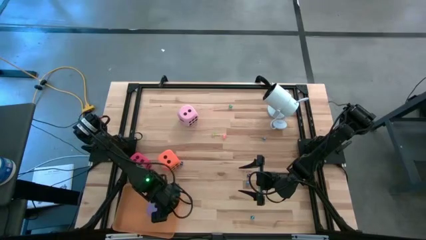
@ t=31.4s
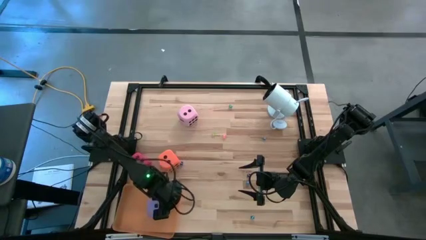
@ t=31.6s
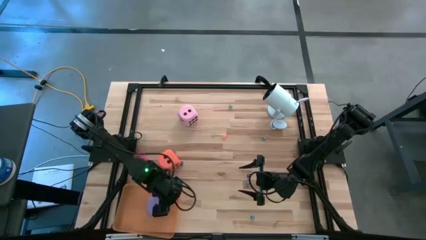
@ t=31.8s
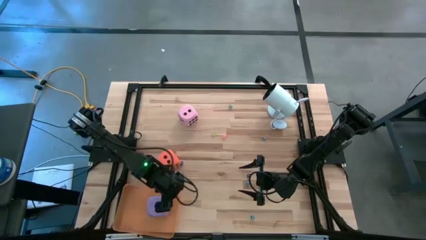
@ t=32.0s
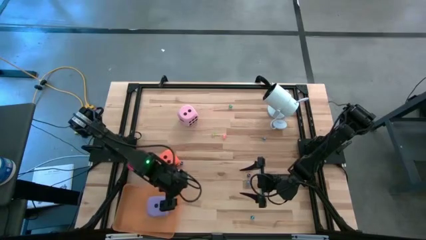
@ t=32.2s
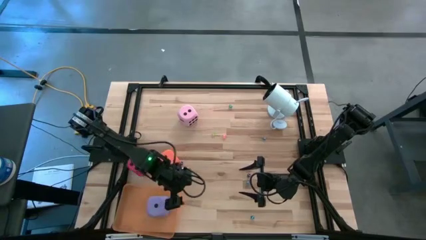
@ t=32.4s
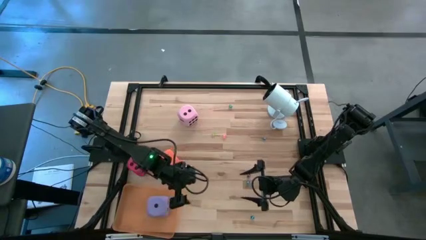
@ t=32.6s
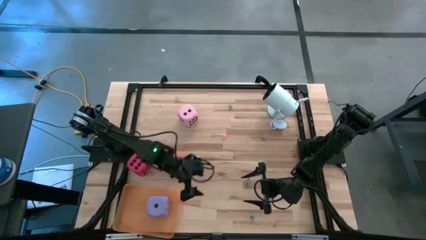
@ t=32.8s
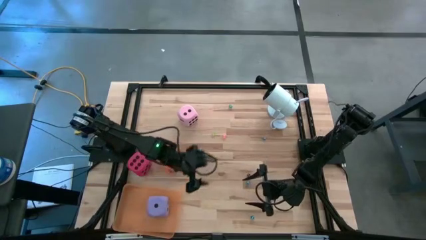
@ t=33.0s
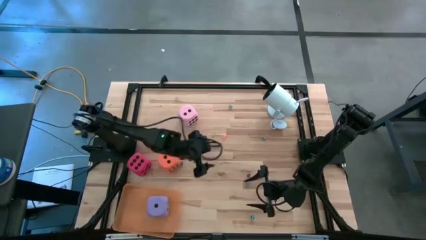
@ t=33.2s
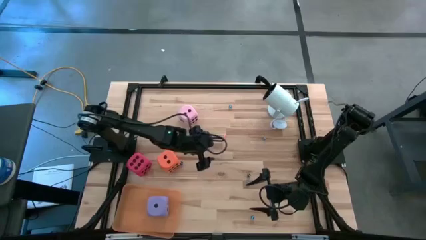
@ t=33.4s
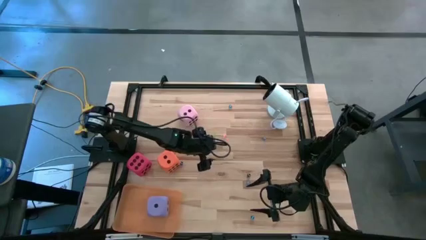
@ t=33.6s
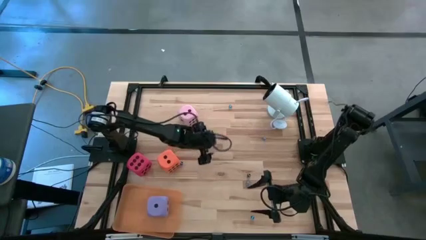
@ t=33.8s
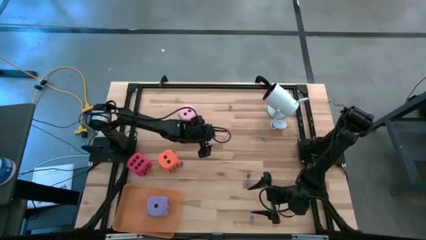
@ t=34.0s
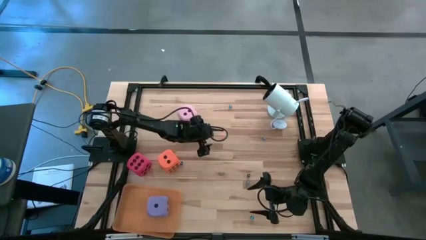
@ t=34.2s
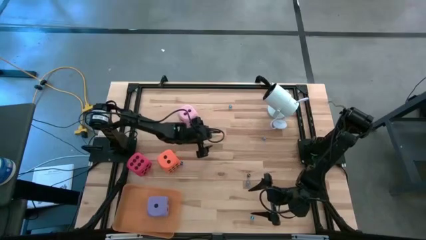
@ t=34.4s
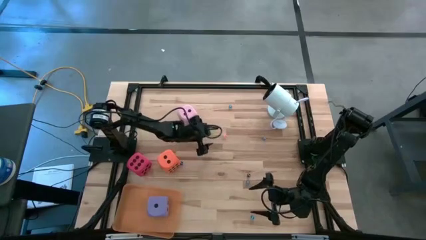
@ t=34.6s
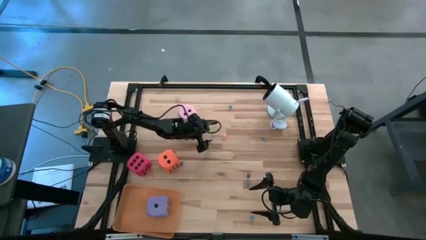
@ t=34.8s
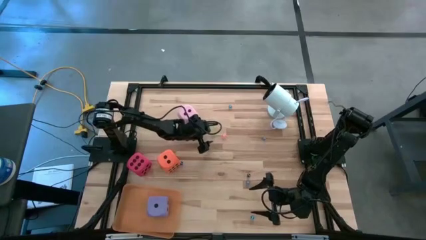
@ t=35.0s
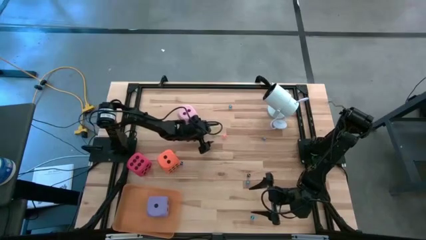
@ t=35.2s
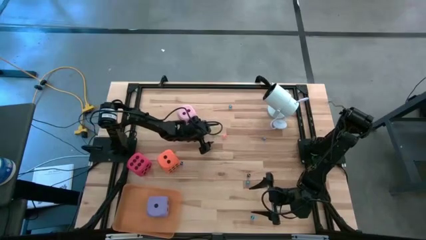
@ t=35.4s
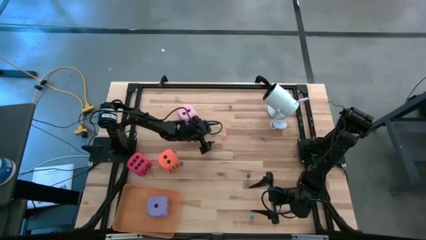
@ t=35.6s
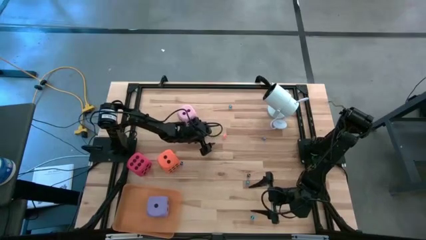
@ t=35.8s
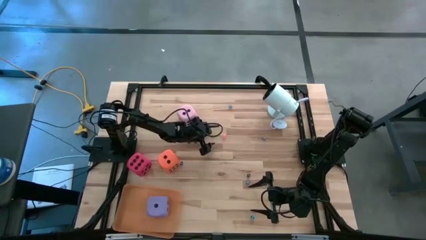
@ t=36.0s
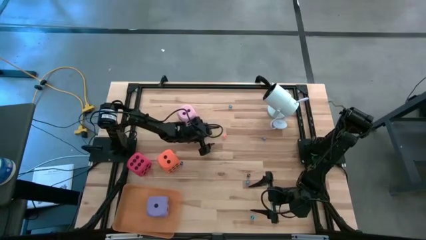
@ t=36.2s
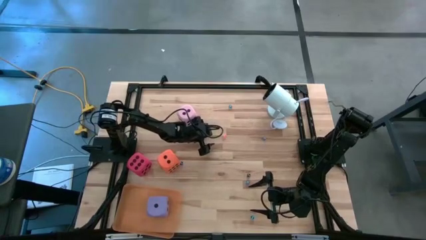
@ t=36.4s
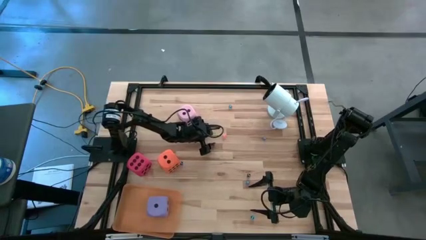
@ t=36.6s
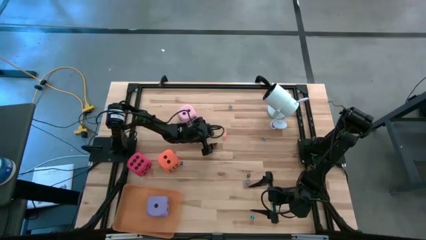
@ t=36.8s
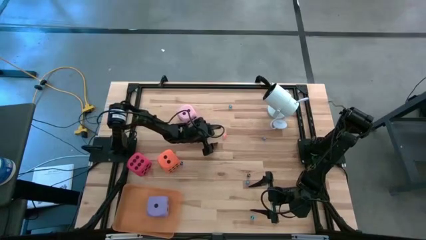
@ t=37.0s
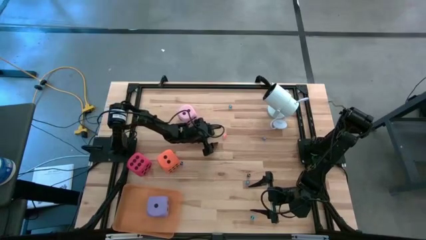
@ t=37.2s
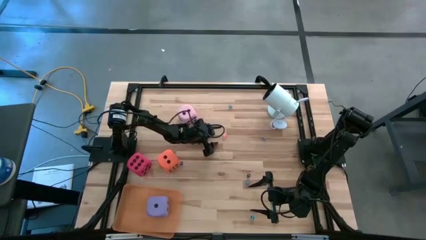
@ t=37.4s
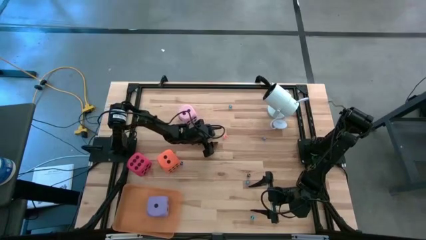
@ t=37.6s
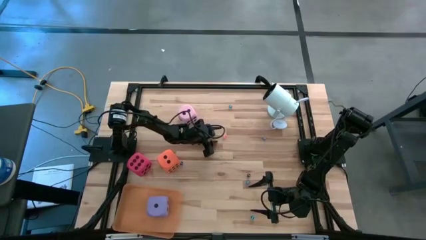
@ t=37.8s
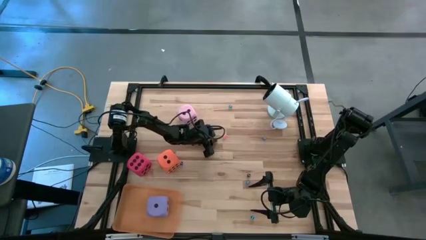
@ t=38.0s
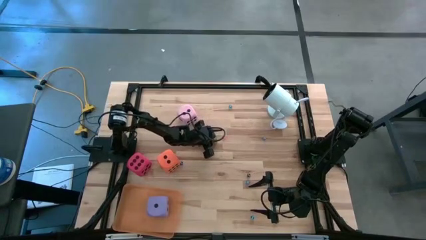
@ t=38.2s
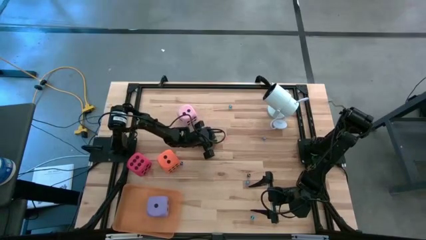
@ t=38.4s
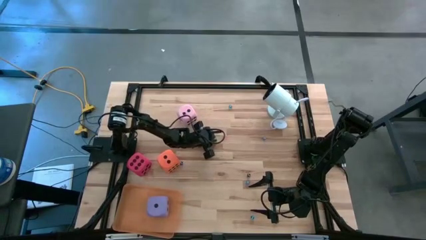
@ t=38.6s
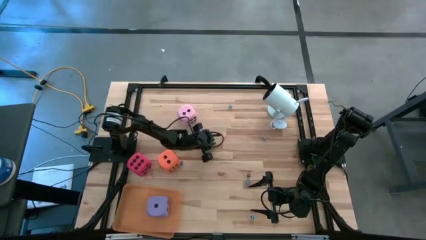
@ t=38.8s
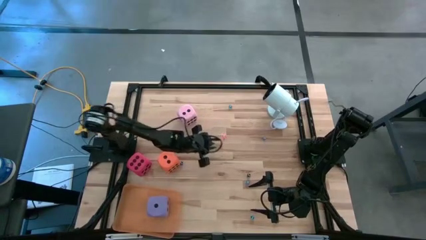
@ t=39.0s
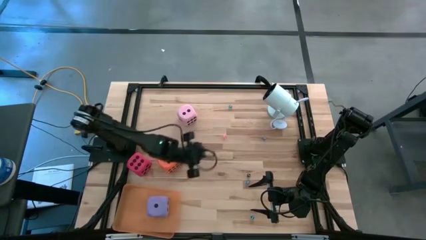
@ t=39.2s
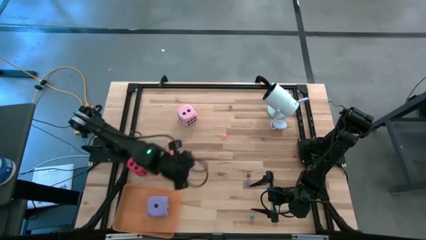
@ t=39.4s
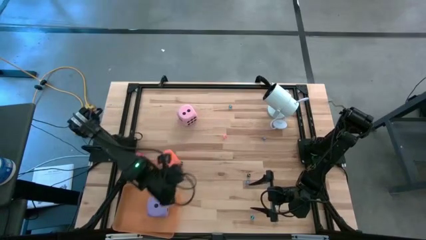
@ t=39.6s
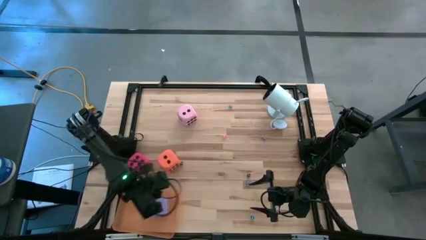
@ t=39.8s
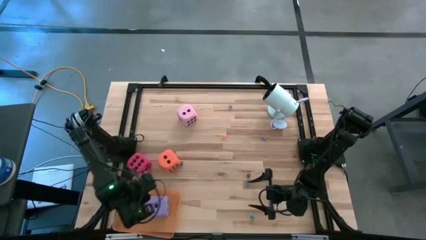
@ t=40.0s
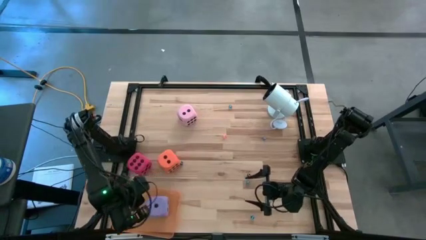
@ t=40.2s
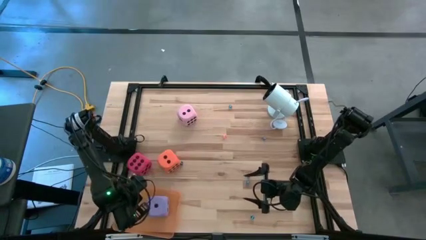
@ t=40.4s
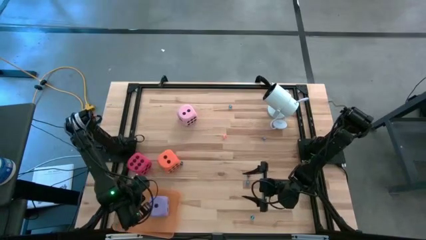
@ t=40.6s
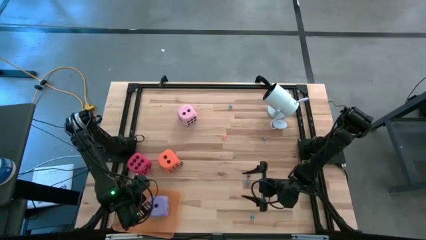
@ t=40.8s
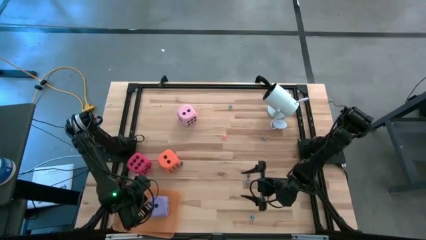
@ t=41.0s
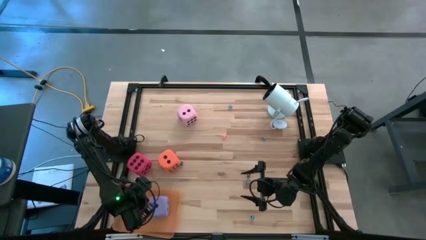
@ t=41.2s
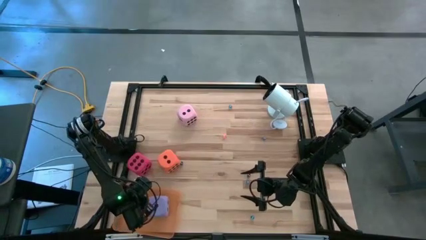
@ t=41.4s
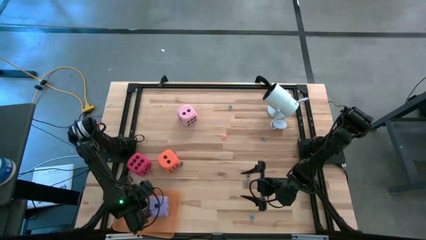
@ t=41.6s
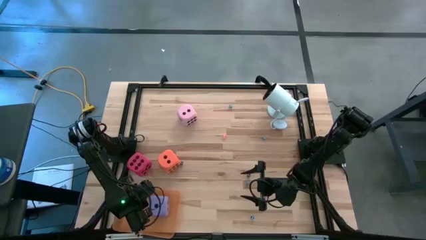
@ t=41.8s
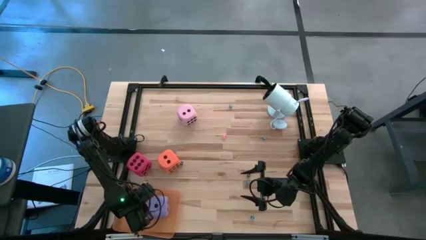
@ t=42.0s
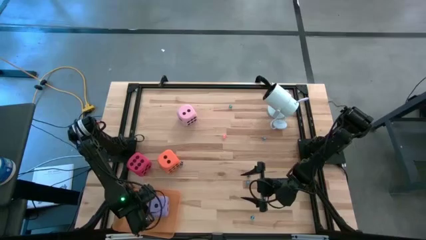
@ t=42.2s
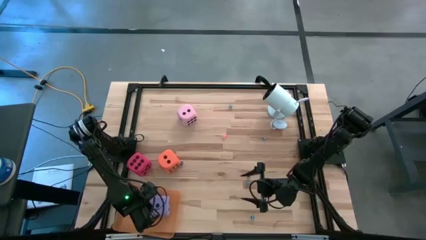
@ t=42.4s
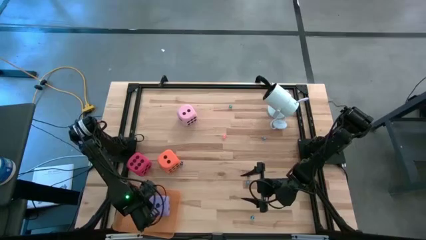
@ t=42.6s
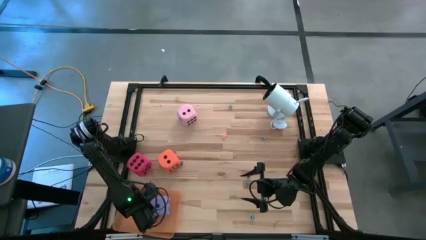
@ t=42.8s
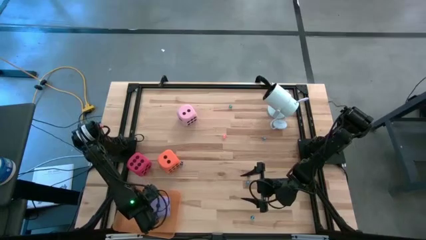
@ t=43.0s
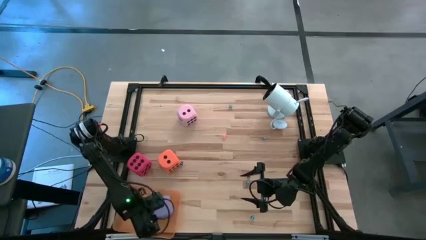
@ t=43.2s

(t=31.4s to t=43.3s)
Task: Pick & Place Dice
Put the small green dice into the orange bin

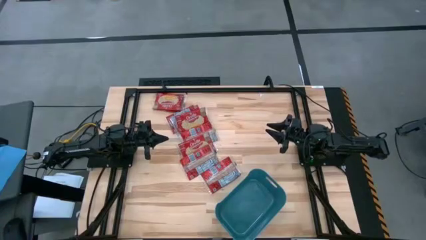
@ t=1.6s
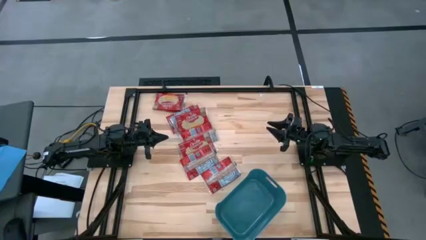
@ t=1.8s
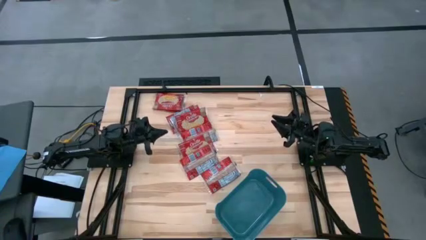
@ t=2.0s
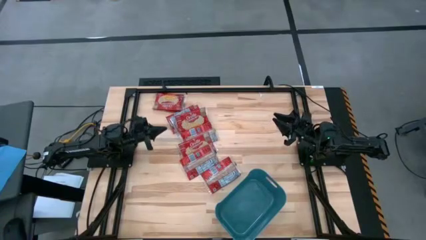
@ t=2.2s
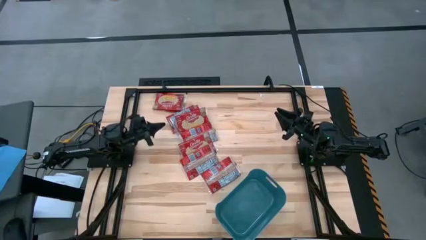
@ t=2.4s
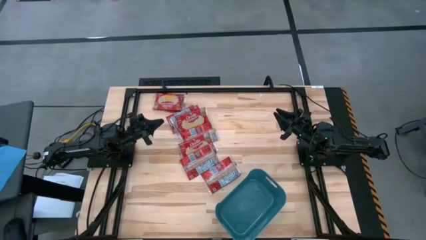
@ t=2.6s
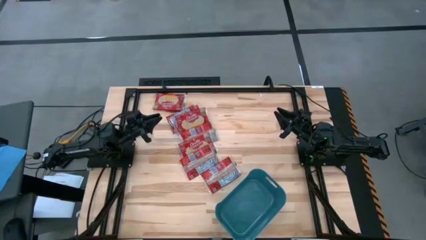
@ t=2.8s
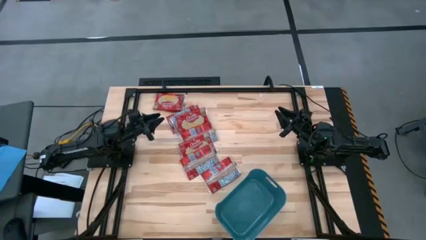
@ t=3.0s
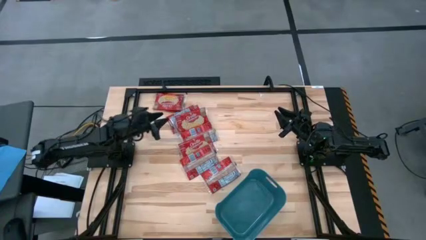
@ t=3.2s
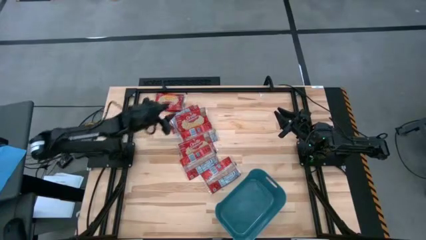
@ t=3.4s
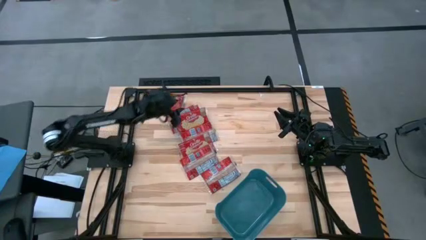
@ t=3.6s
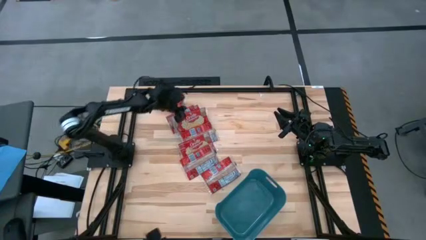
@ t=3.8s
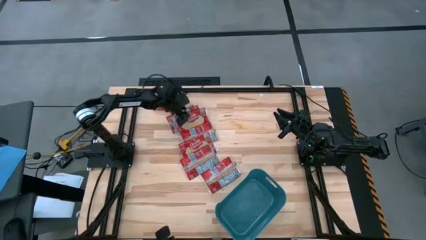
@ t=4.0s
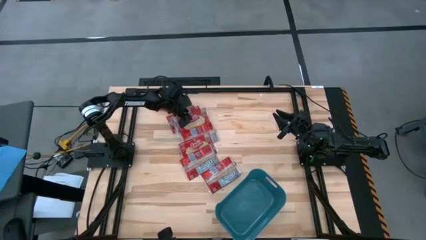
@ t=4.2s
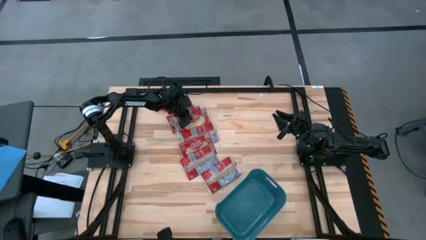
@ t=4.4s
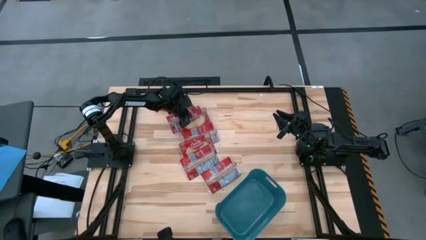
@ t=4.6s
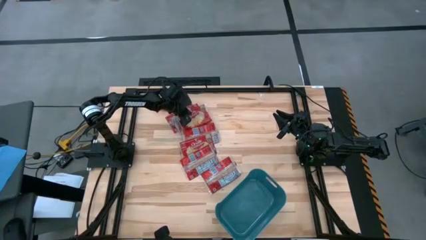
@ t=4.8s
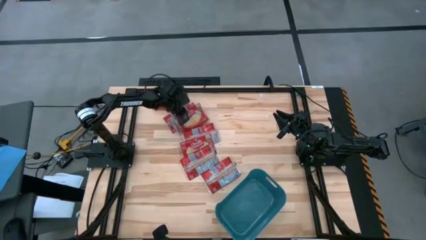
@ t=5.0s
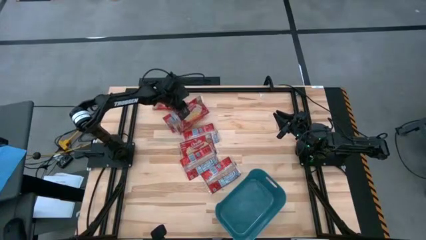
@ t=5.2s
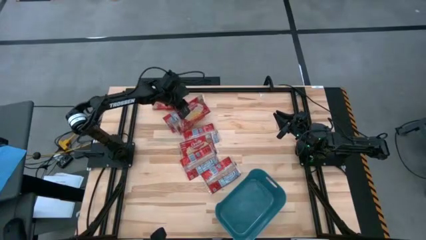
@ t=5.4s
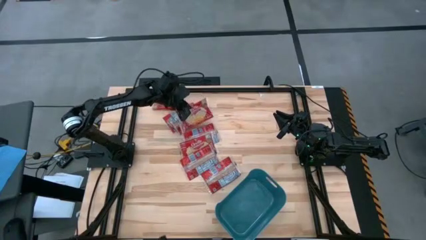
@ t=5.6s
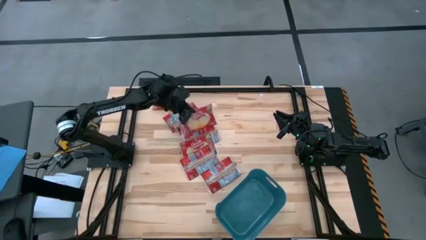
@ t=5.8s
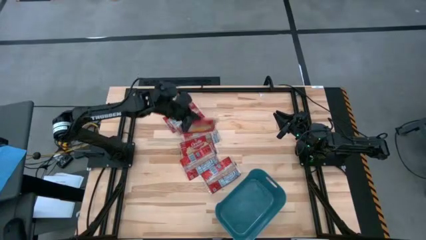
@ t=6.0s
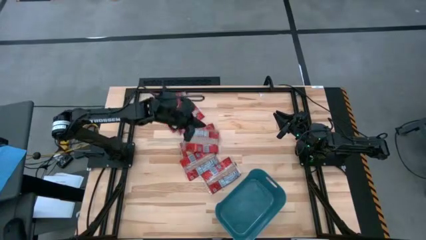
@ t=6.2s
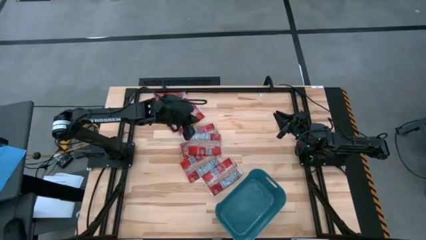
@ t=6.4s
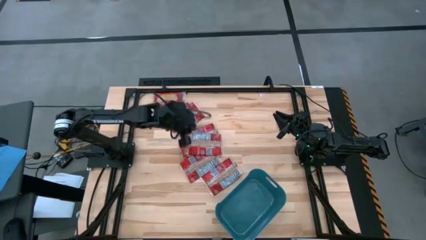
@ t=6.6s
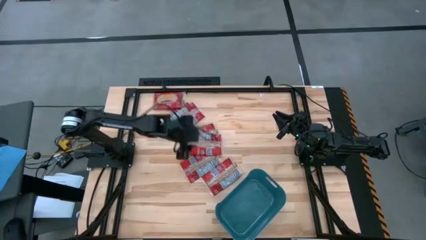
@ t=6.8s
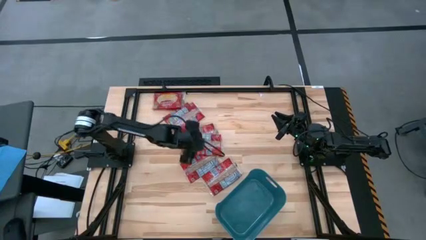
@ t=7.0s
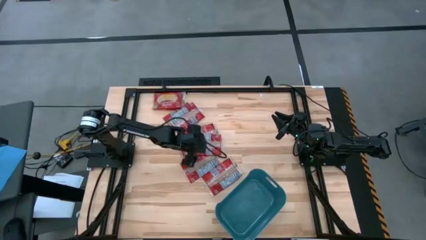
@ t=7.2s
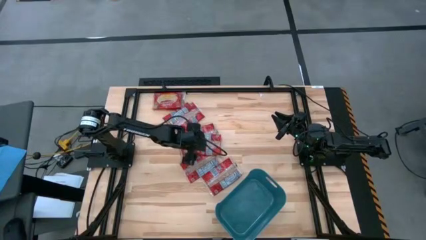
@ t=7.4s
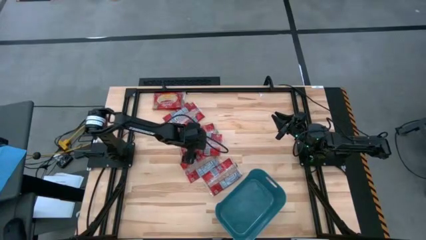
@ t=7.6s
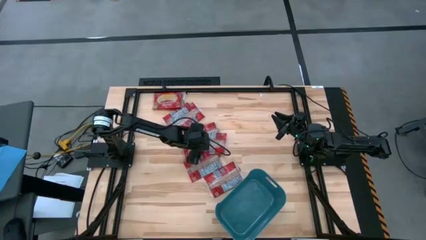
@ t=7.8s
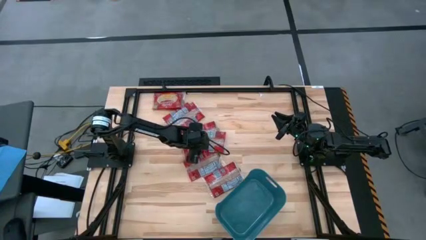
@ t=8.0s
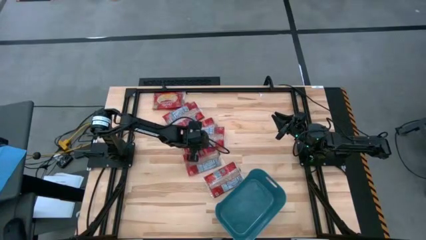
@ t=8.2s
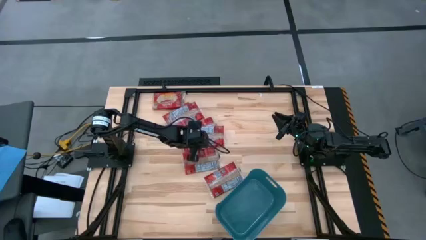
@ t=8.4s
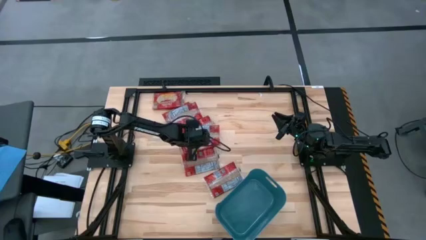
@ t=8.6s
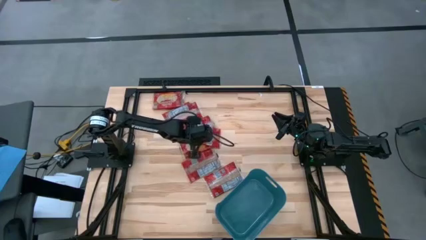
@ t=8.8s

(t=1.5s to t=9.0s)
Task: Sort popcorn bags into baskets
Put the popcorn bag into the blue container
